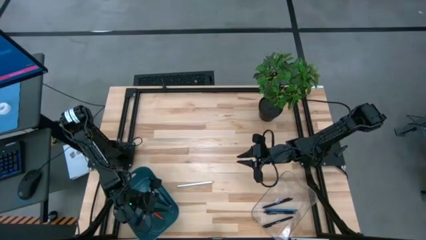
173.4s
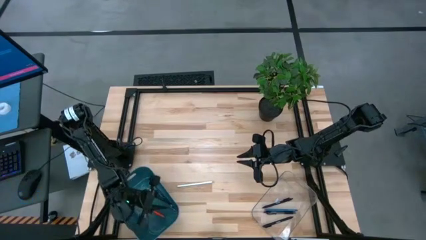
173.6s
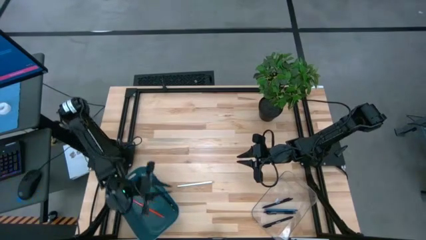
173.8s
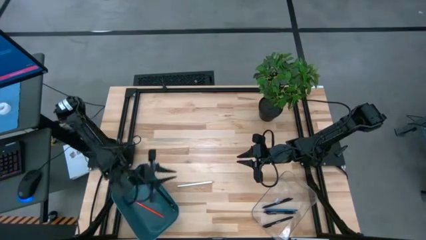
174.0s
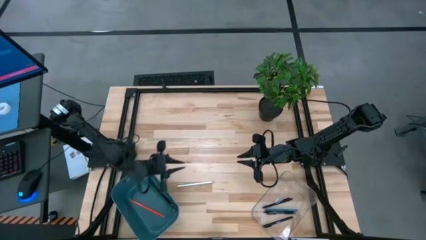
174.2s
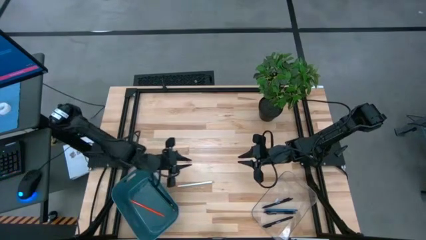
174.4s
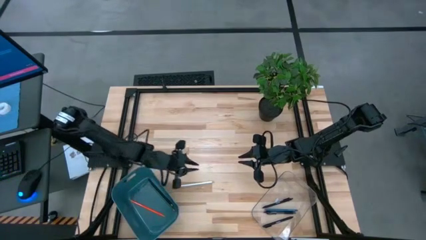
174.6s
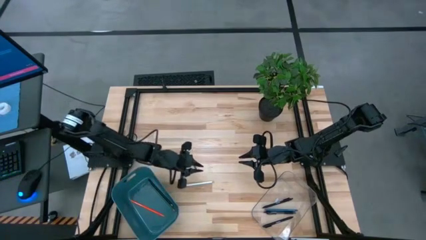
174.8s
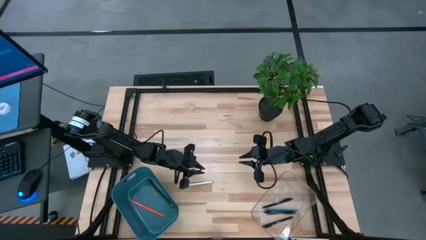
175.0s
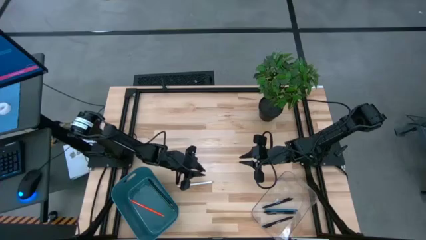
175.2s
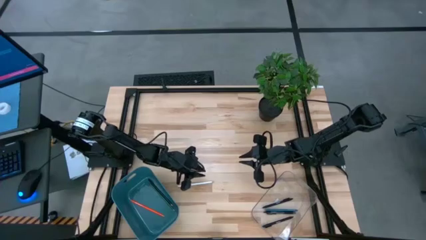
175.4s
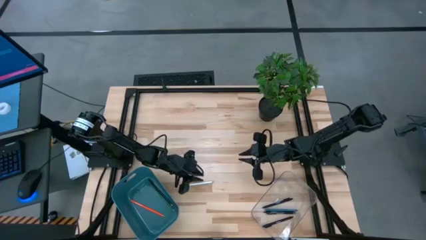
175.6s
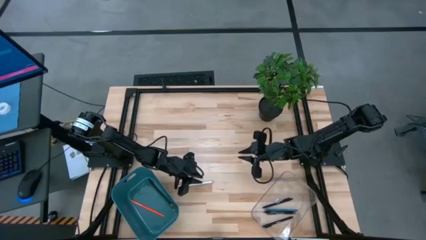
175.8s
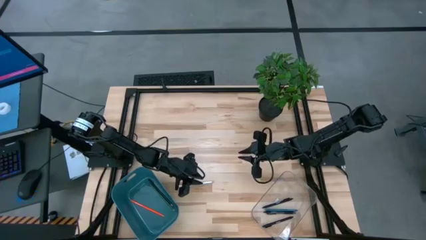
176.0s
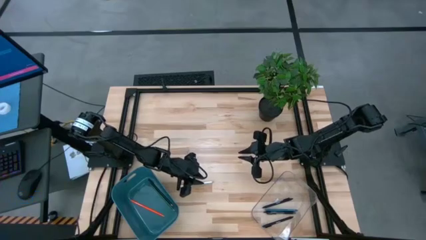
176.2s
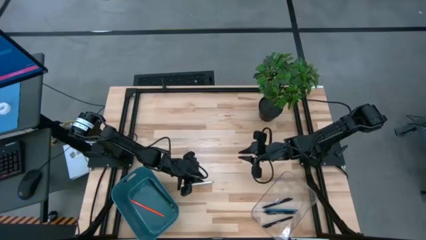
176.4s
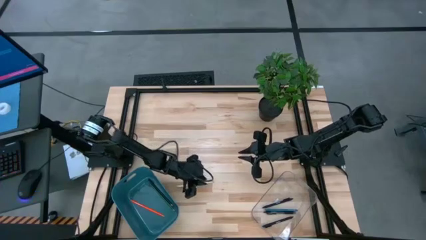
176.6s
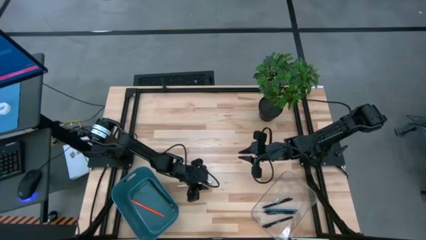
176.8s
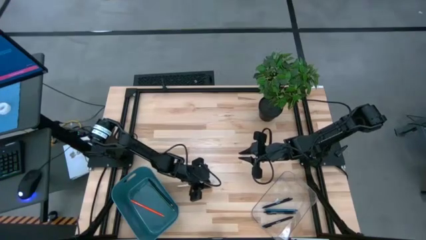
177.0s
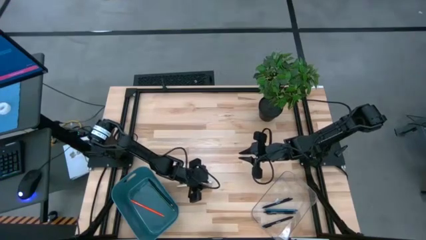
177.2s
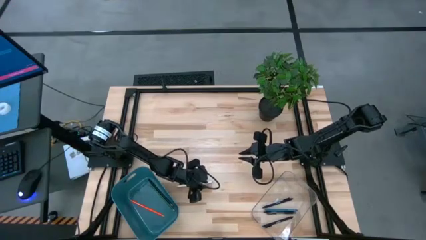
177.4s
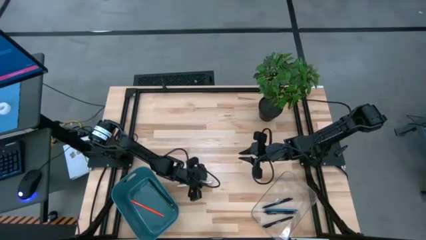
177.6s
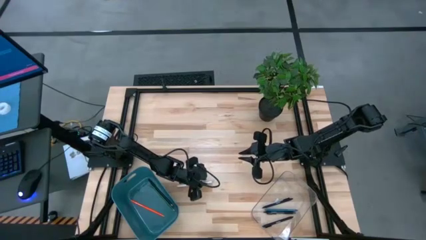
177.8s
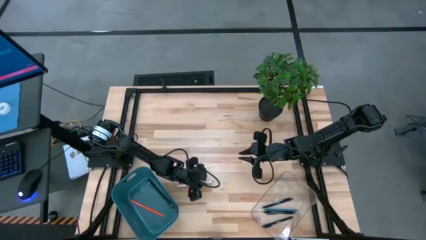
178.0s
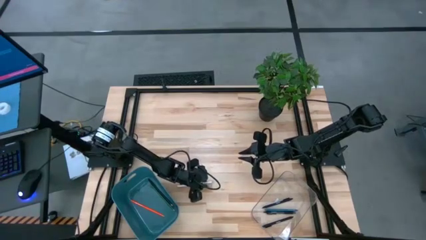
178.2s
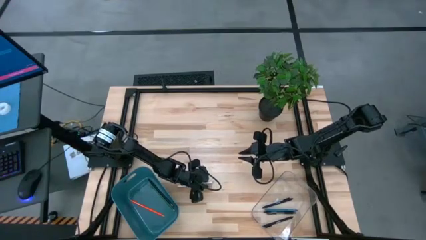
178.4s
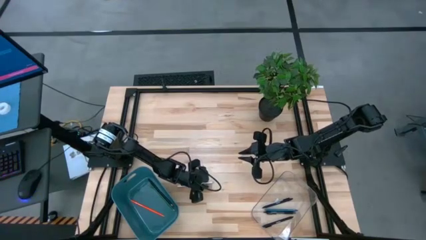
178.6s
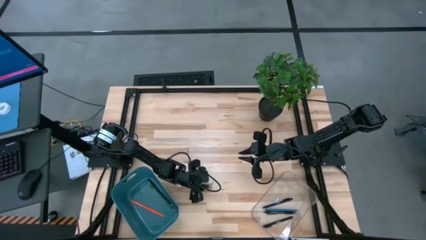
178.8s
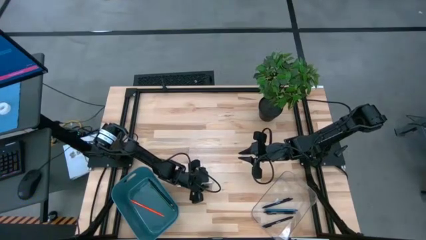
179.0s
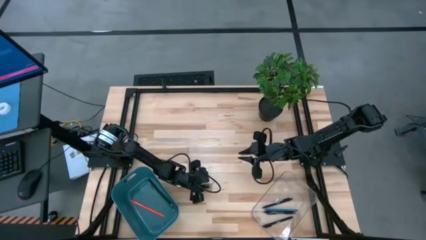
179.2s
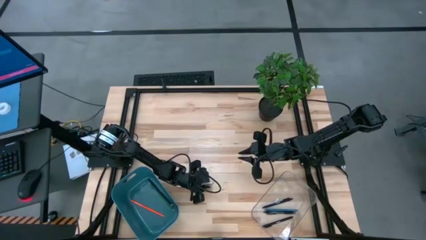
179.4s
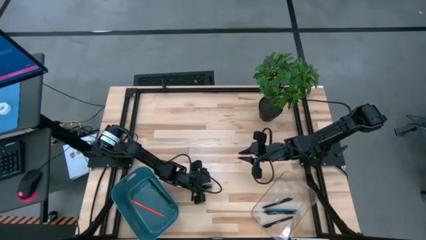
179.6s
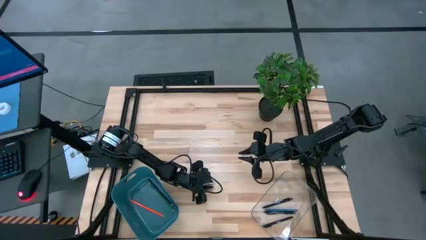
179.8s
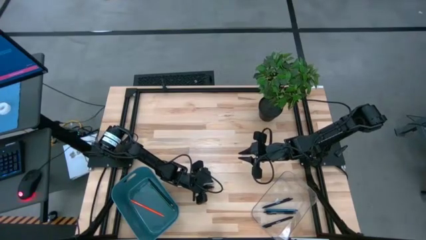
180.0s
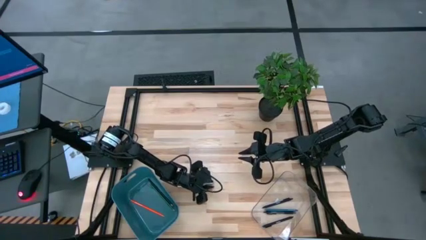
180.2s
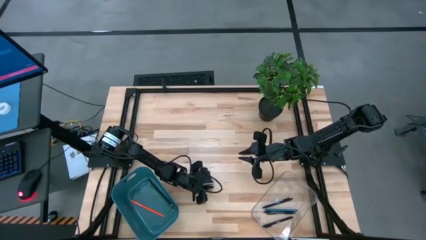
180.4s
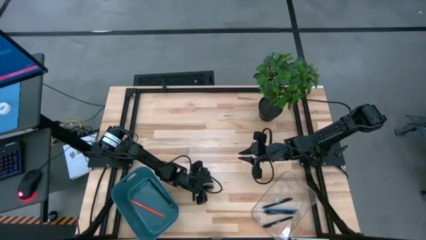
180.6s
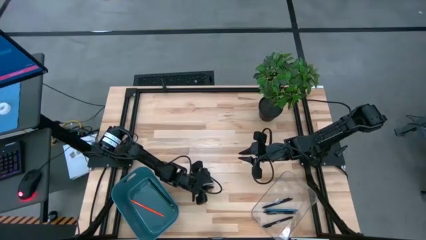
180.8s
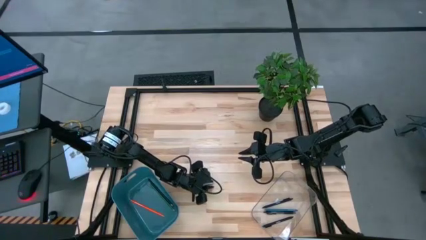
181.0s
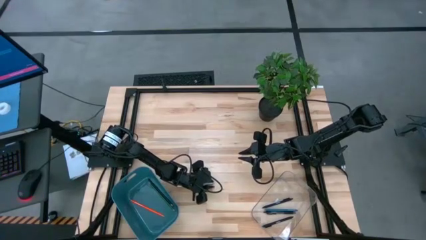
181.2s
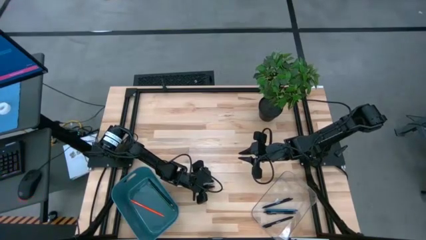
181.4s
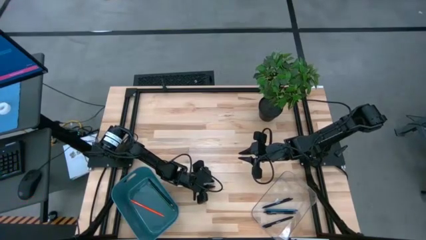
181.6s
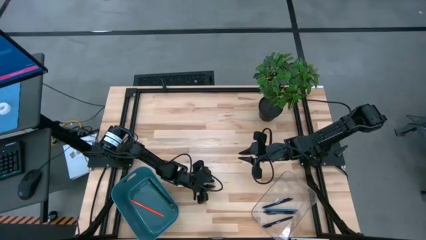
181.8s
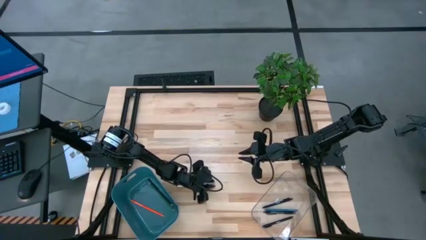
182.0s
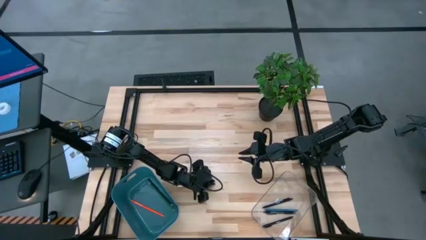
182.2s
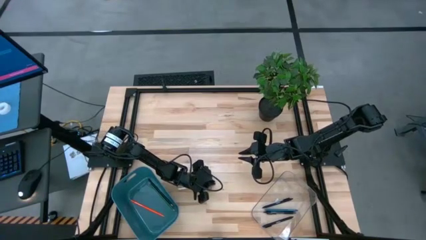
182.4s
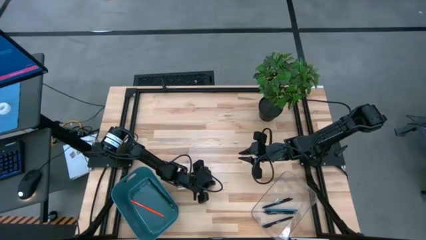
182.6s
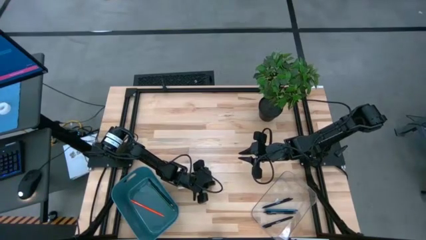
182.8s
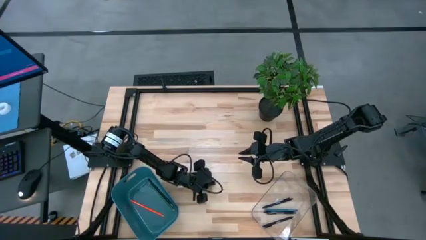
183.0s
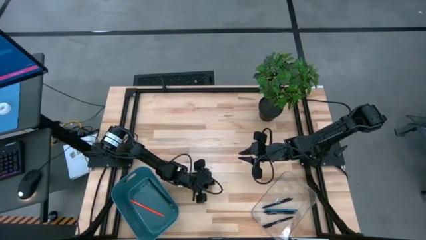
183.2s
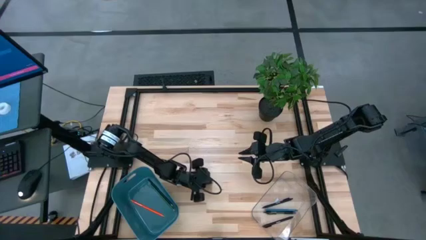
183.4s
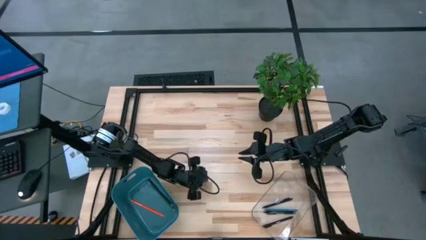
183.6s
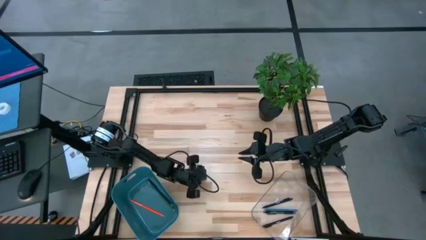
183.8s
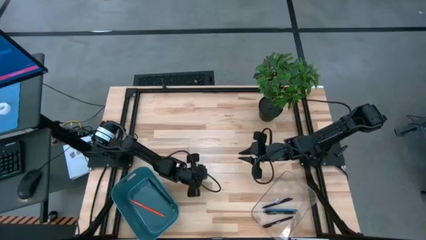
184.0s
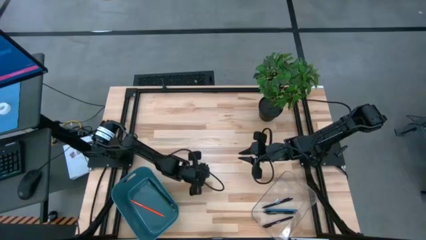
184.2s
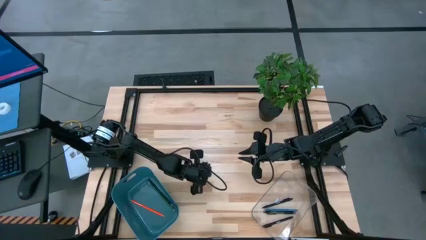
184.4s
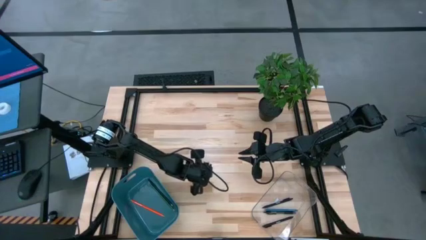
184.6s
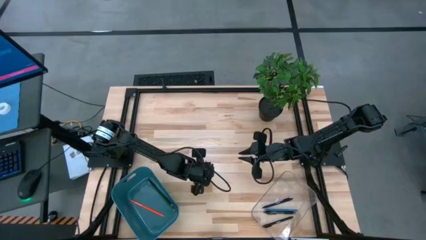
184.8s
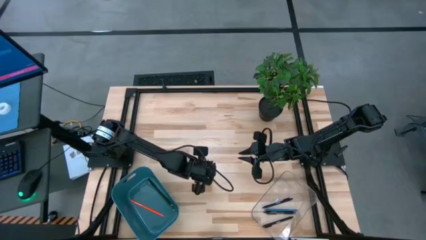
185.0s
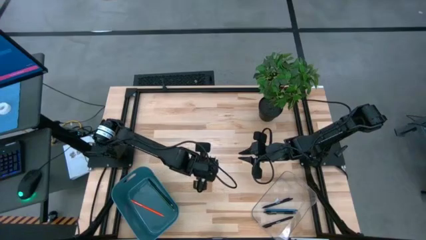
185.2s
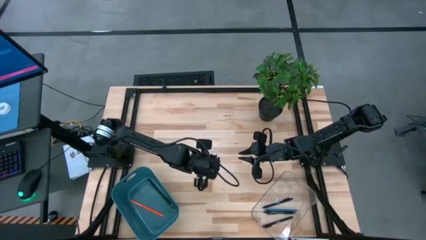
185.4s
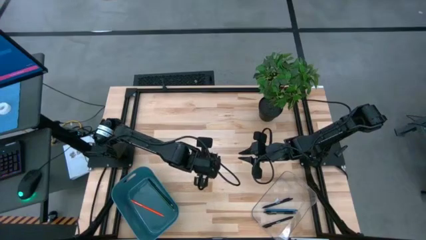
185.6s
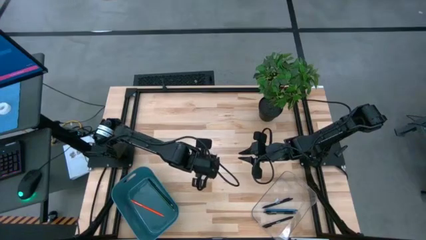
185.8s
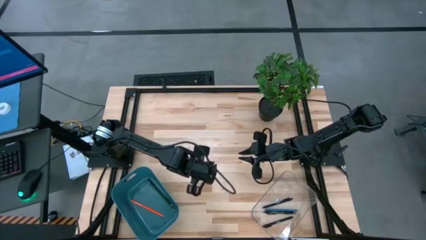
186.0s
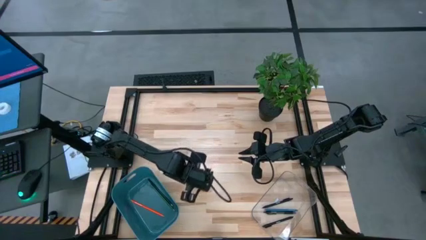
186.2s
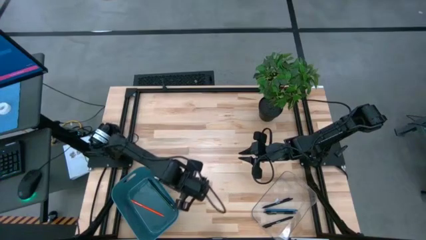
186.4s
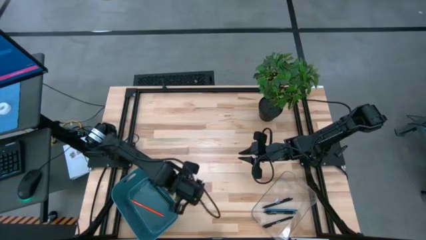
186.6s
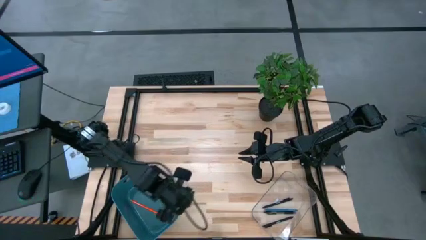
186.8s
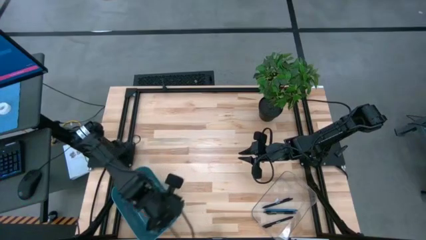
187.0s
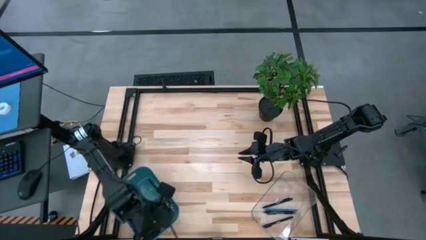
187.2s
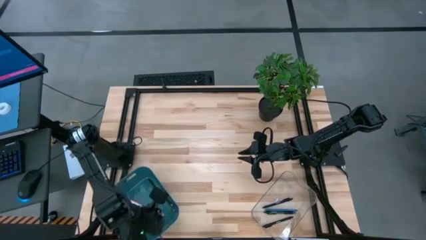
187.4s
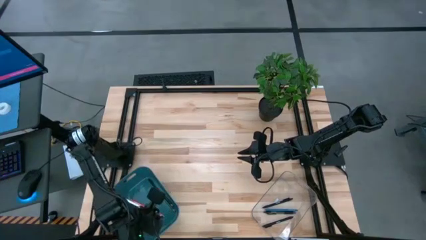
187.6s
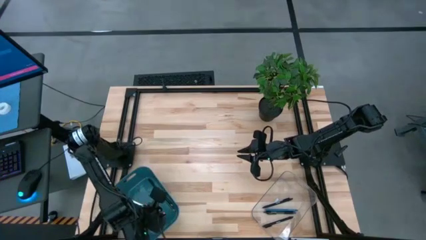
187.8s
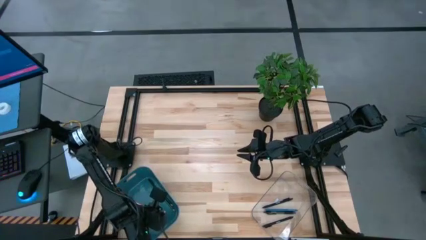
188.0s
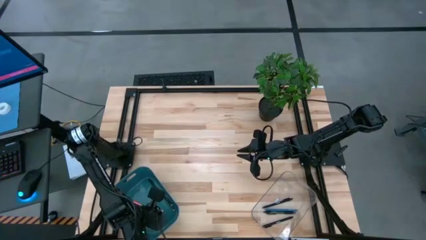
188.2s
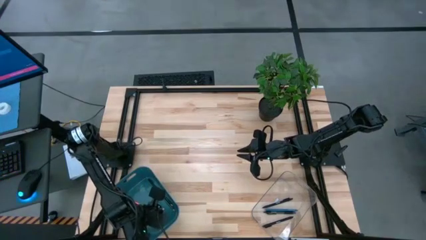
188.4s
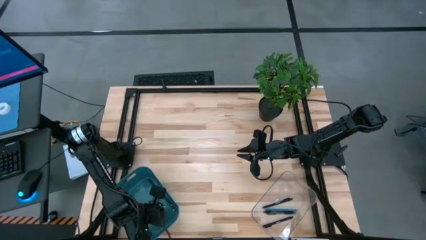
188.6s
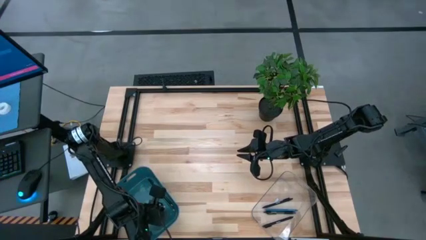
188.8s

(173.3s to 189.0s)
Task: Sort pens & pencils
Put the white pencil in the blue bin
